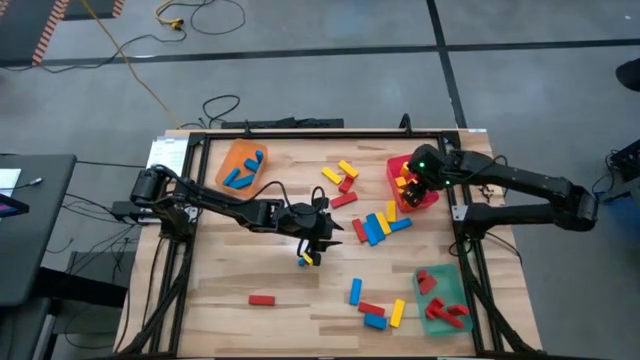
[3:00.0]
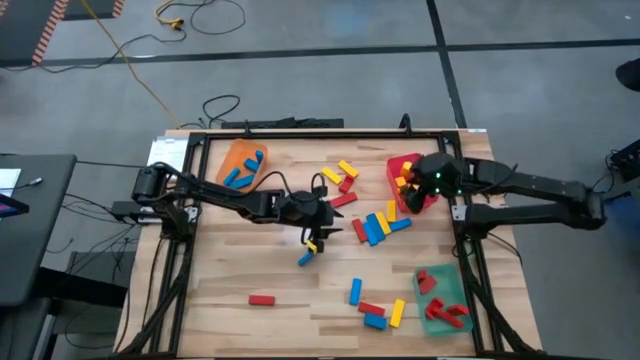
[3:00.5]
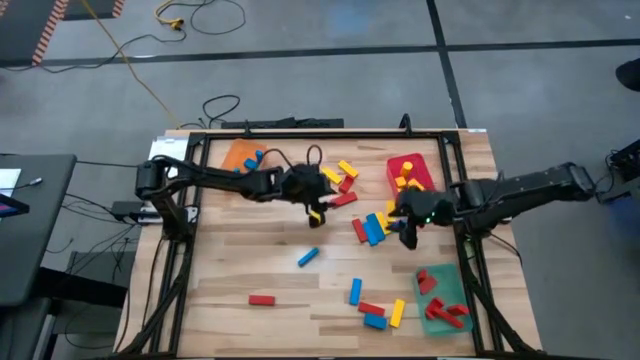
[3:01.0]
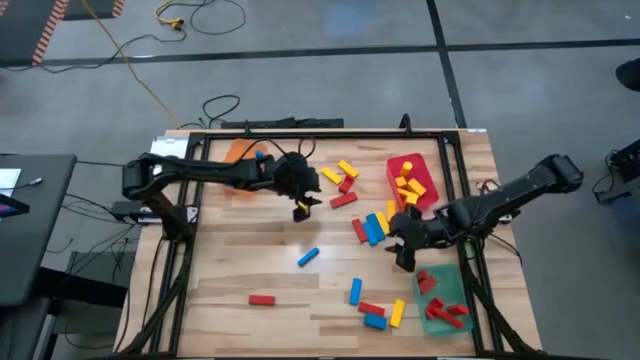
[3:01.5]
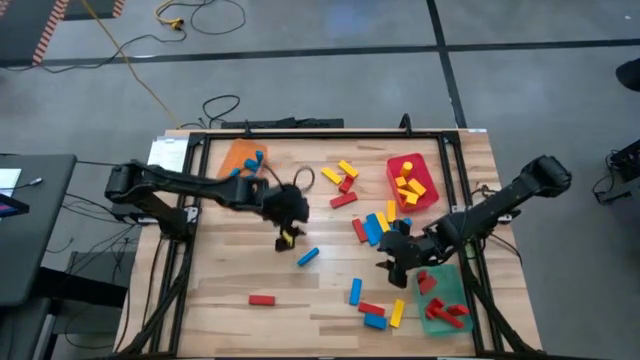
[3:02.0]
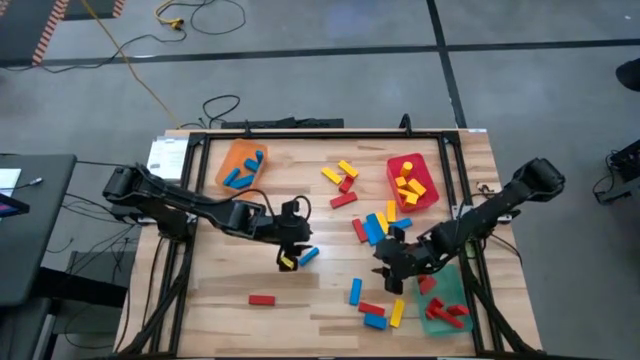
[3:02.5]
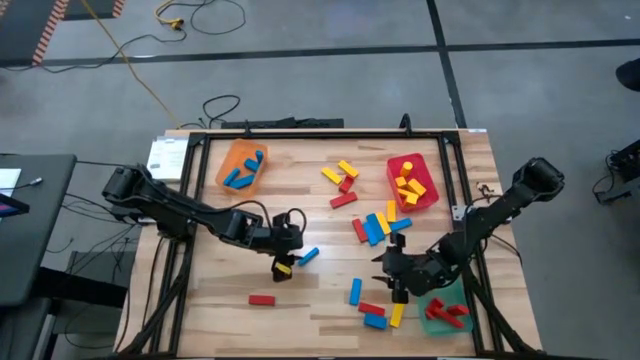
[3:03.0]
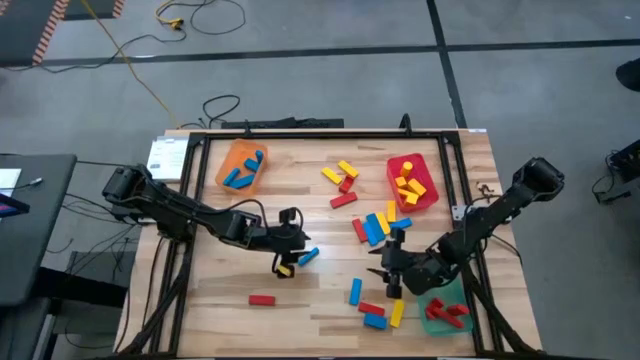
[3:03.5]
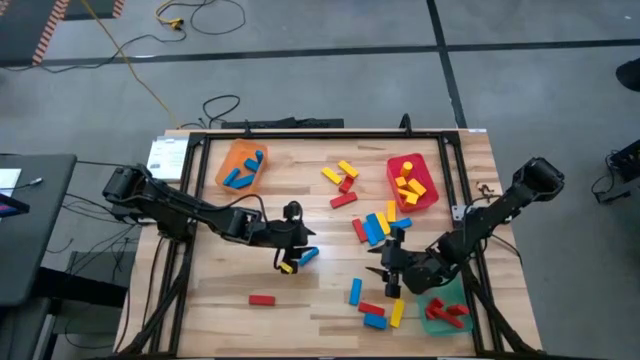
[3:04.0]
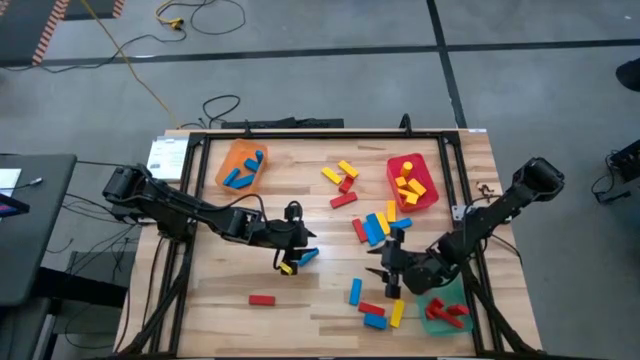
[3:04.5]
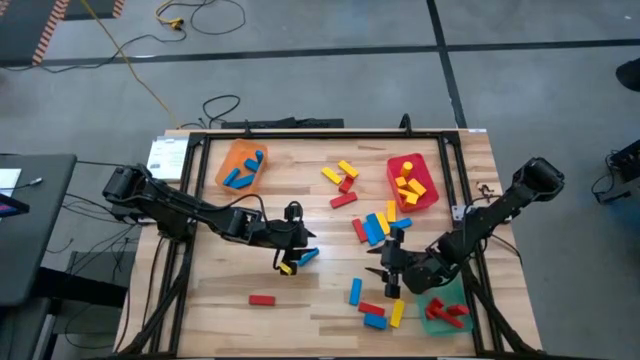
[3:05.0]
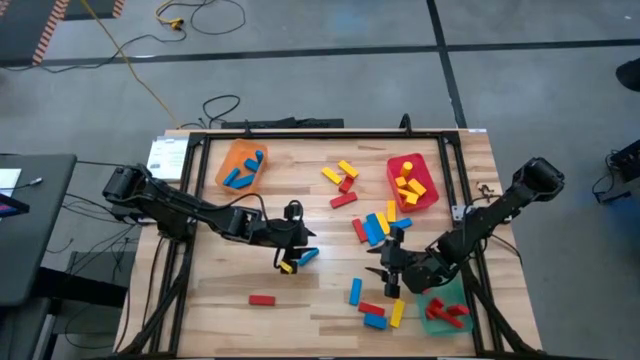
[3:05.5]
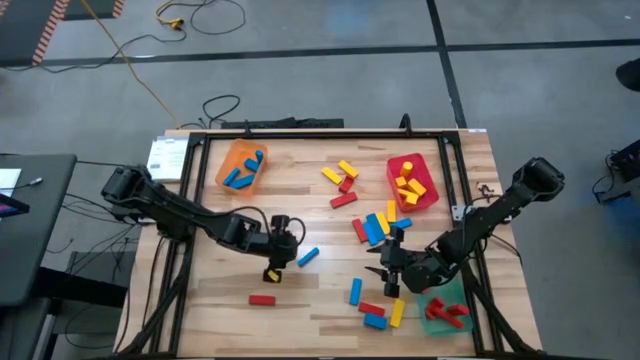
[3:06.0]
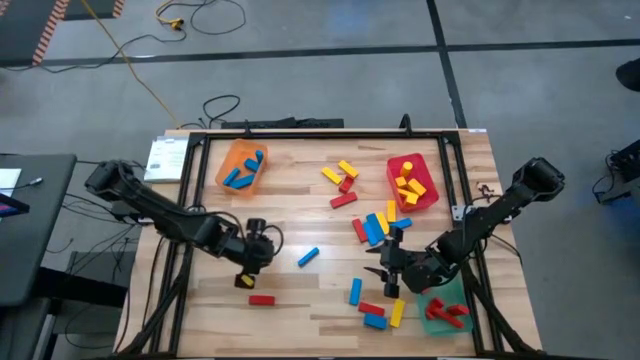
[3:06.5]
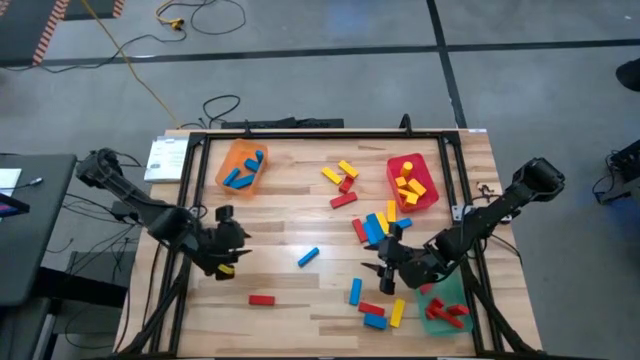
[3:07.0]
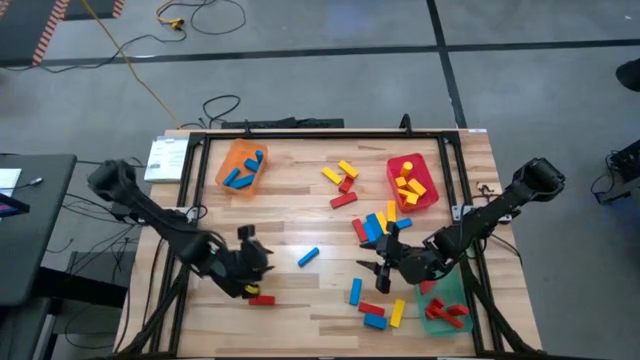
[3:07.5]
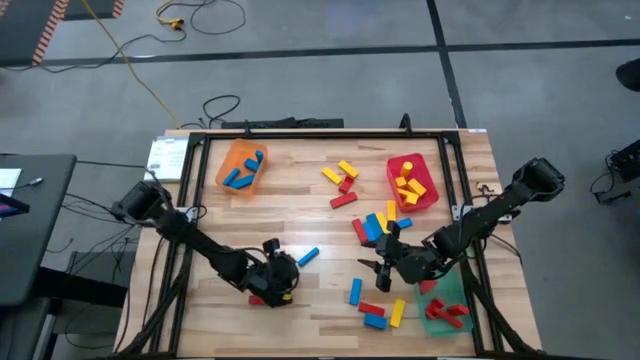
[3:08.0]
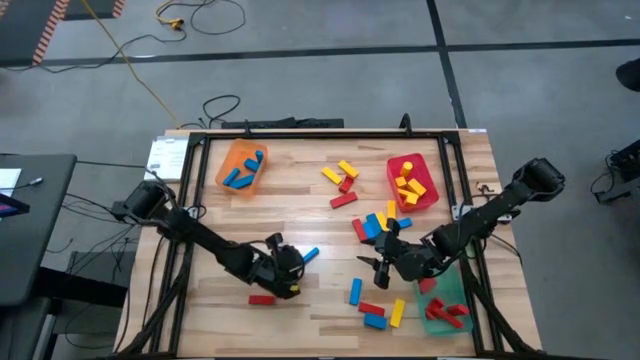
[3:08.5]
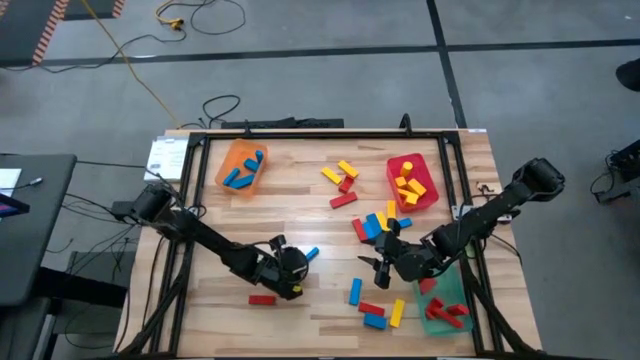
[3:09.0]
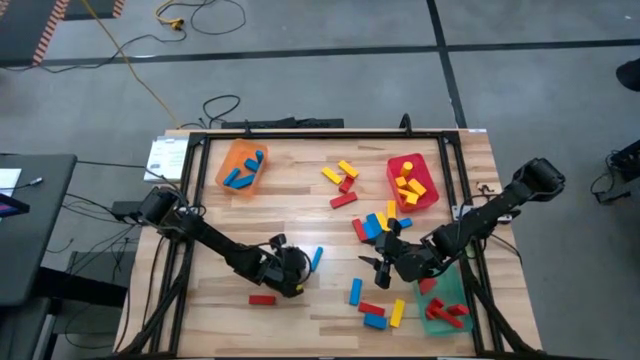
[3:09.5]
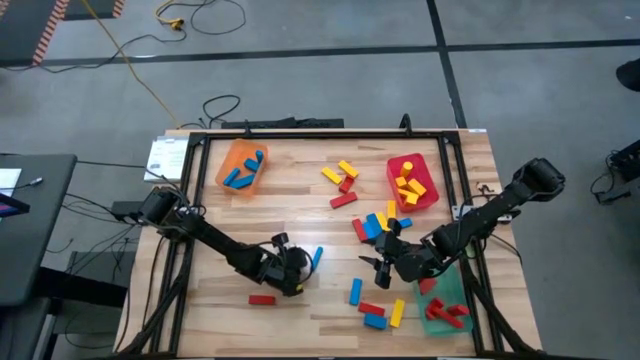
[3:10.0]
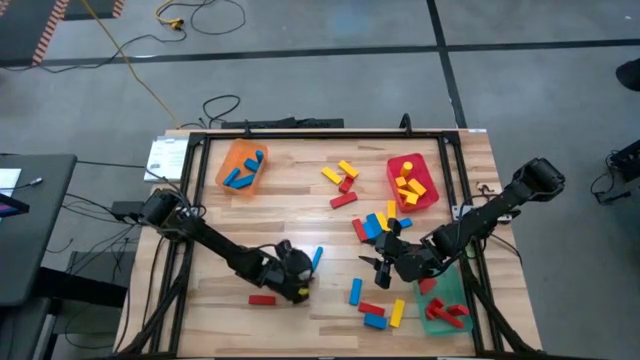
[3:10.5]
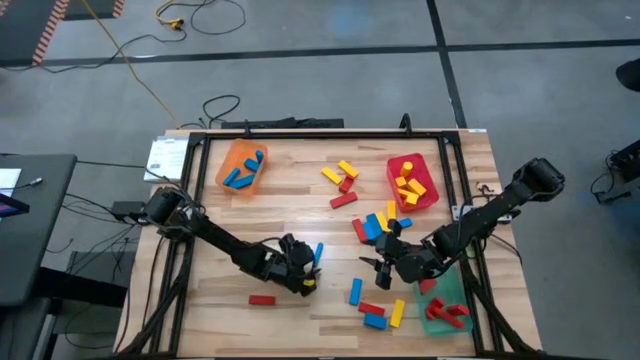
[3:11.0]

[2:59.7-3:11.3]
Task: Sort blocks
Put the blue rectangle block into the orange bin

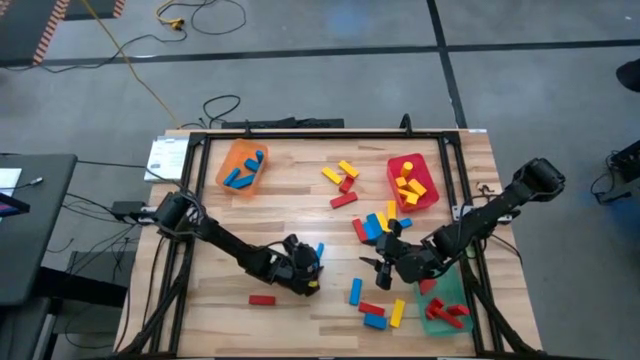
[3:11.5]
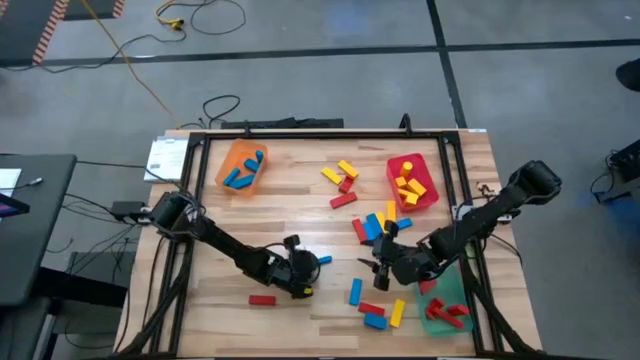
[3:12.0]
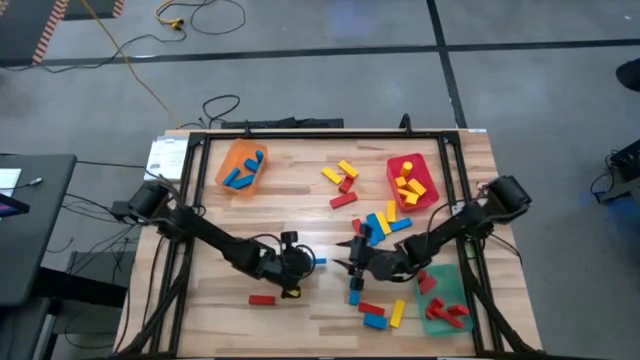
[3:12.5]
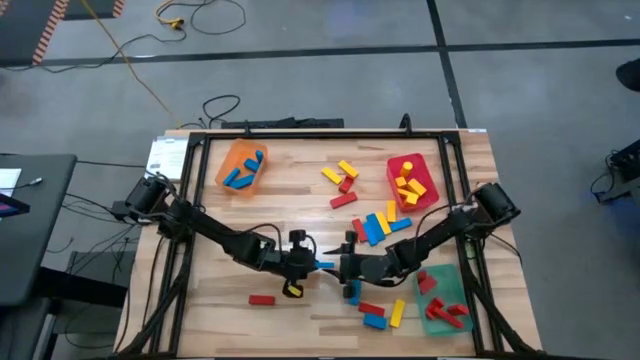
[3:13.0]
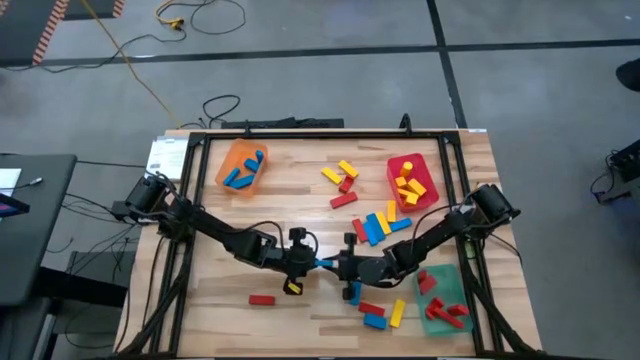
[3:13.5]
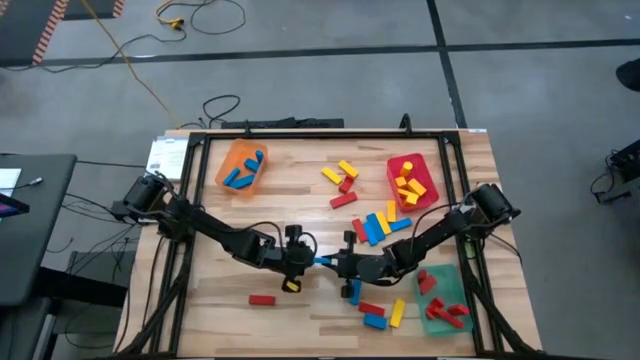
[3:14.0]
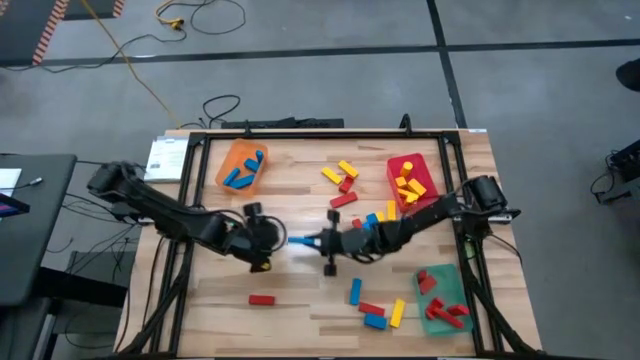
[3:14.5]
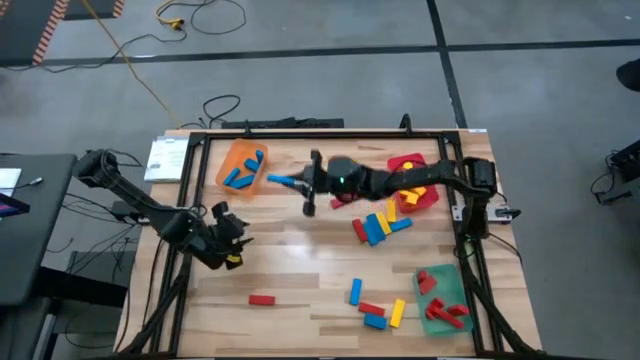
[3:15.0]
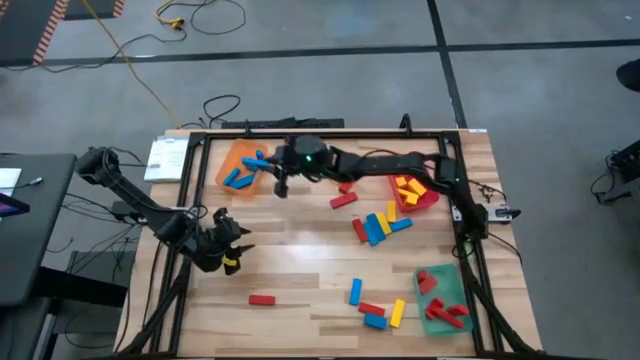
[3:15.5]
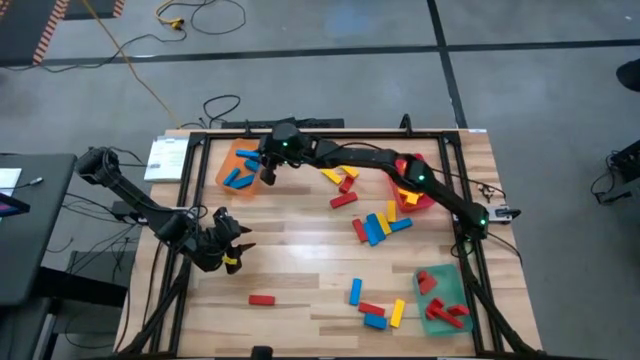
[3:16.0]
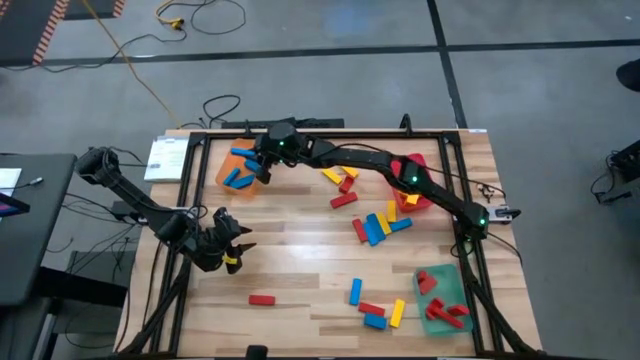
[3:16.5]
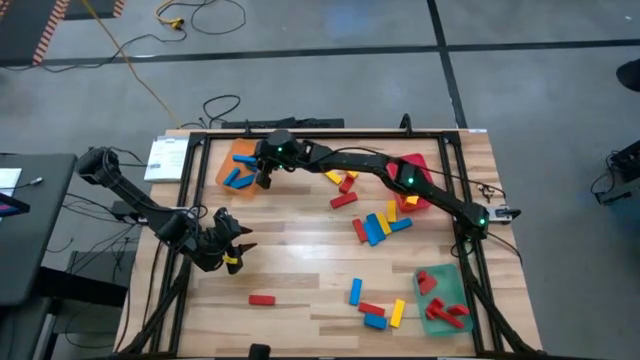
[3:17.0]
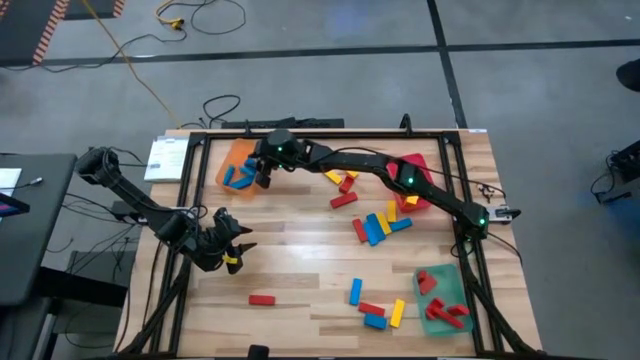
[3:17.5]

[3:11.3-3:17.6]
Put the blue rectangle block into the orange bin

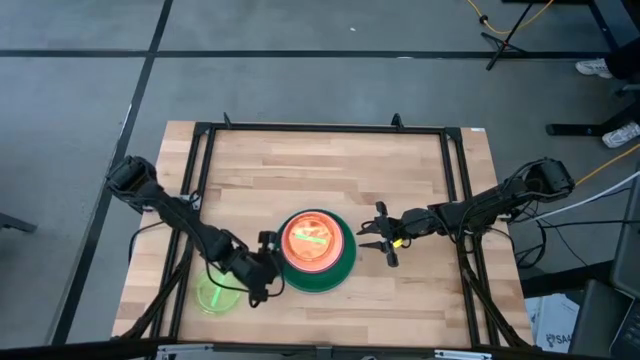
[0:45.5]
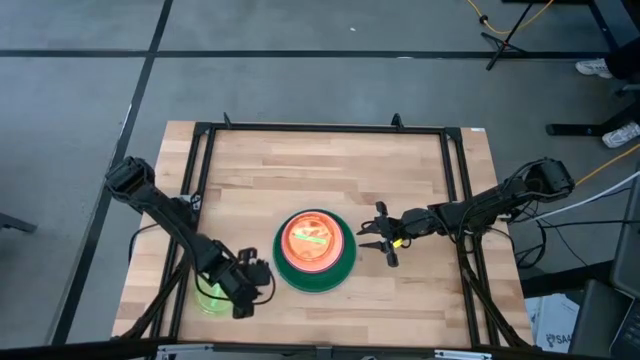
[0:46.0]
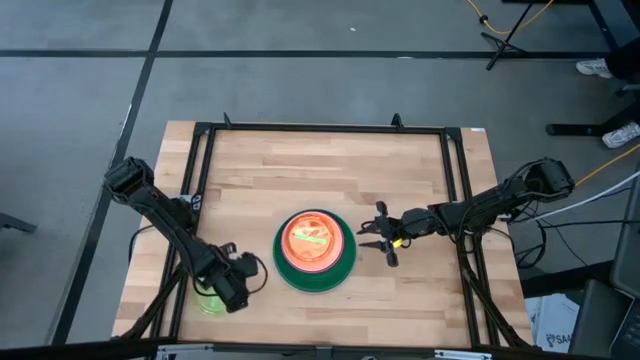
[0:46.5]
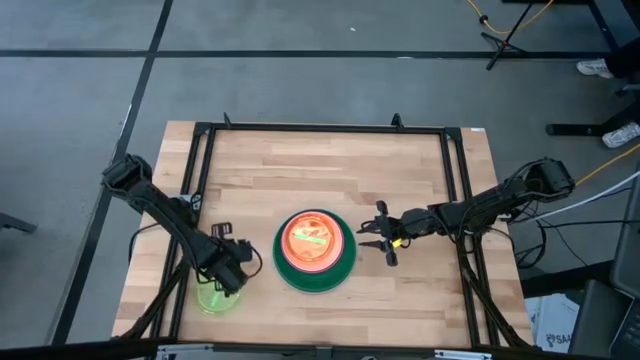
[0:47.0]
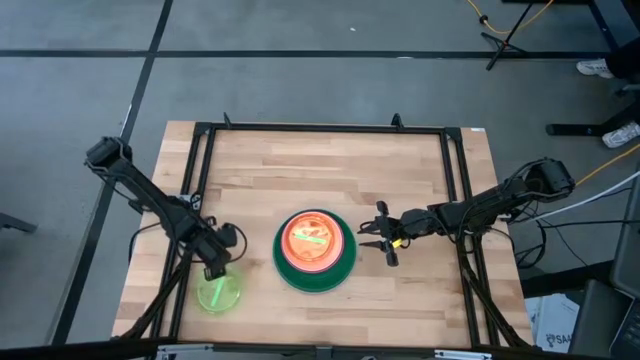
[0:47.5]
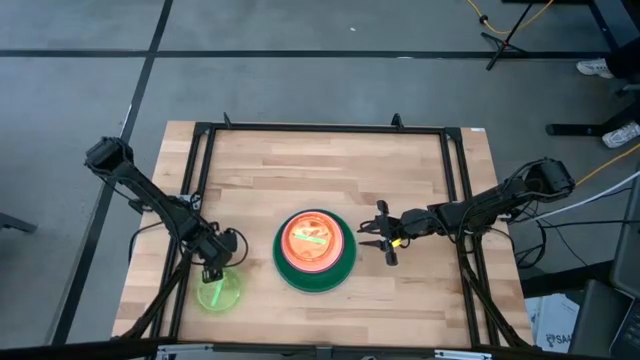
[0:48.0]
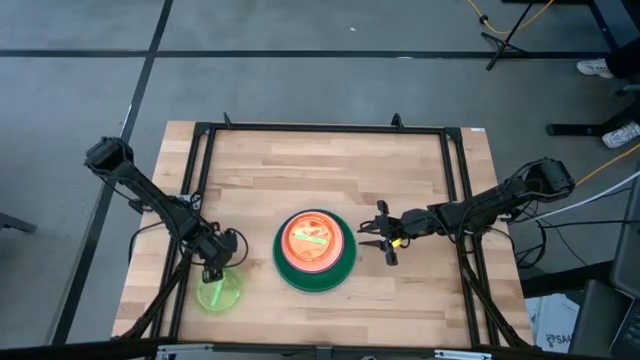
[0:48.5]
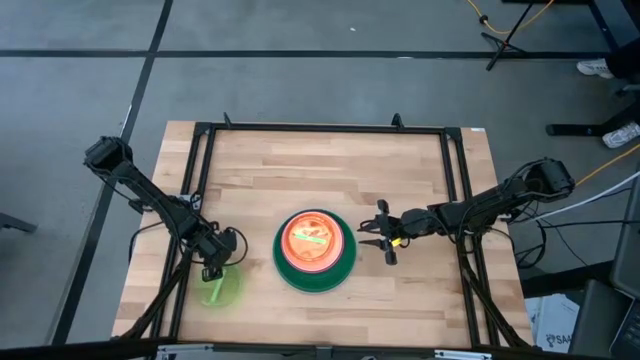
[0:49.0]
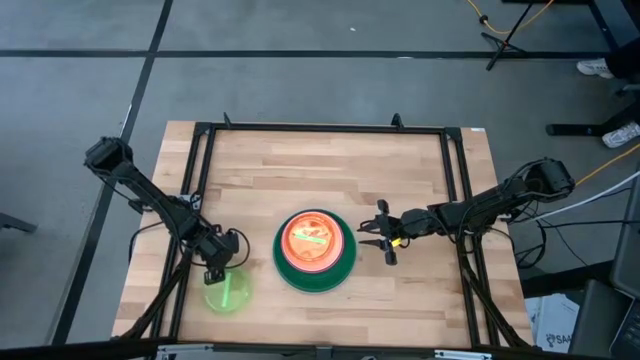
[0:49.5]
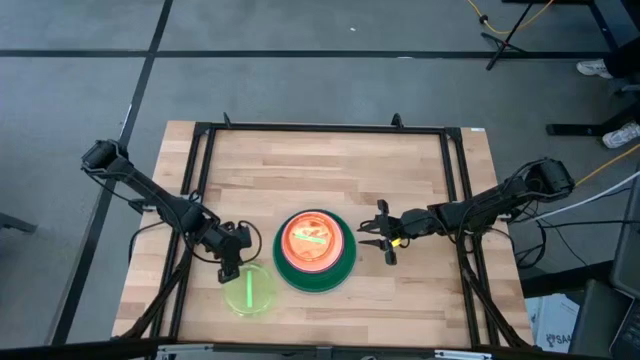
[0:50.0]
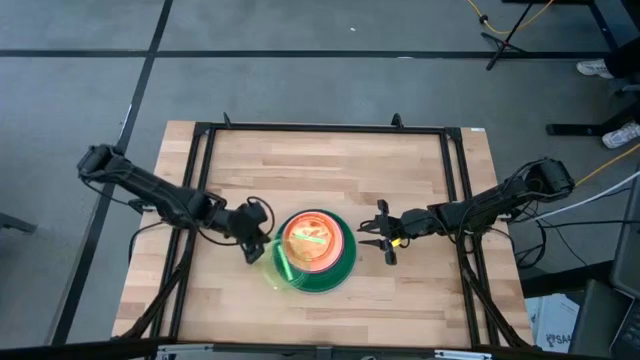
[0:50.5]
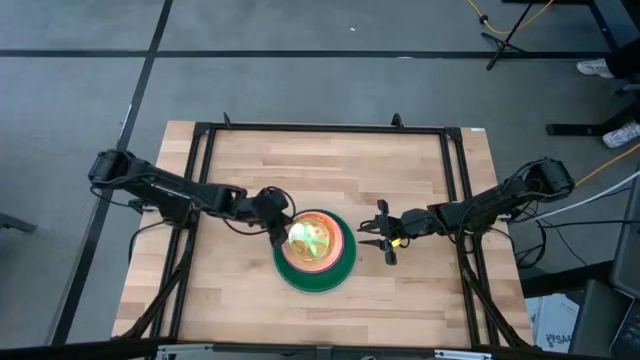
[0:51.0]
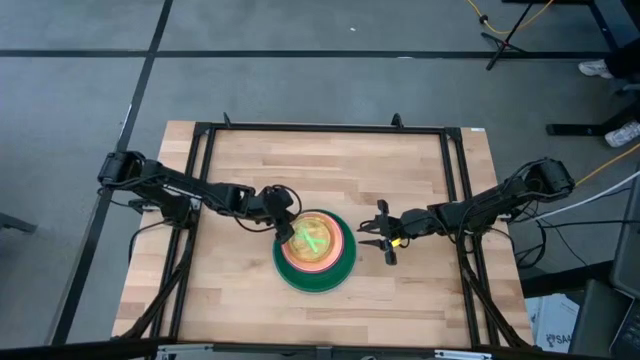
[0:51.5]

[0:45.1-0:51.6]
Task: Stack plastic plates
Stack the transparent green plate on the stacked plates
